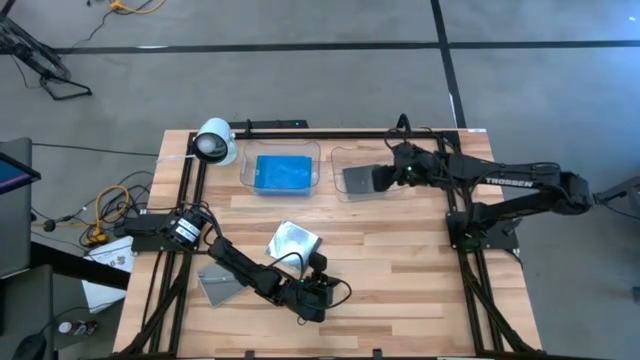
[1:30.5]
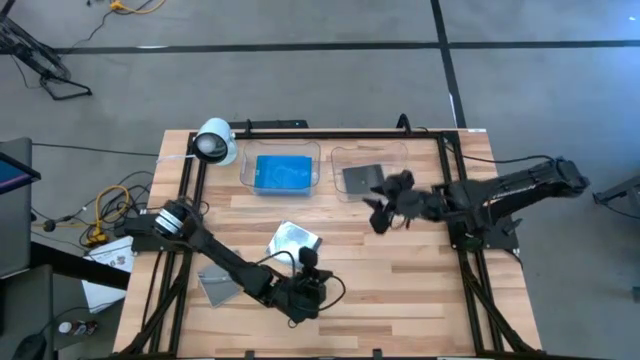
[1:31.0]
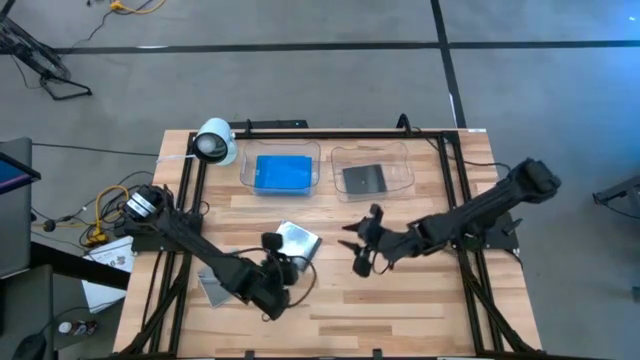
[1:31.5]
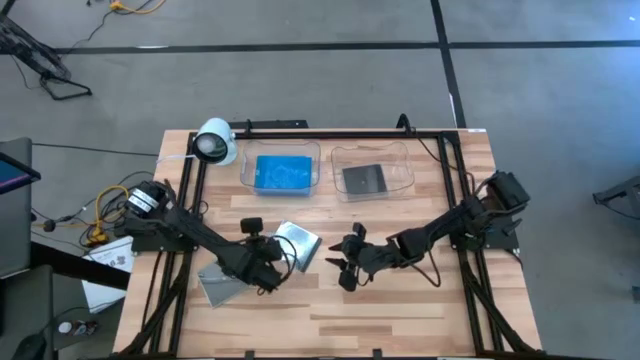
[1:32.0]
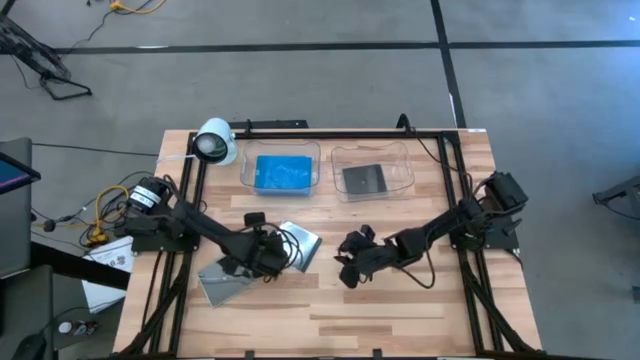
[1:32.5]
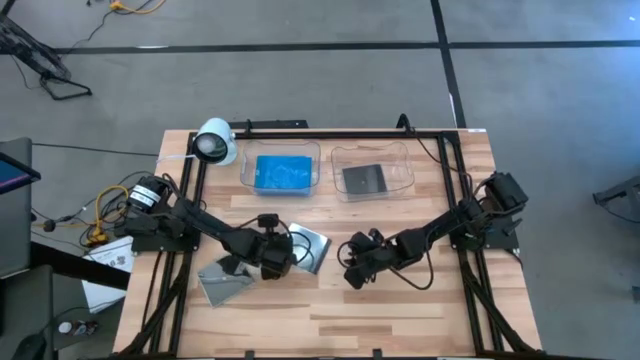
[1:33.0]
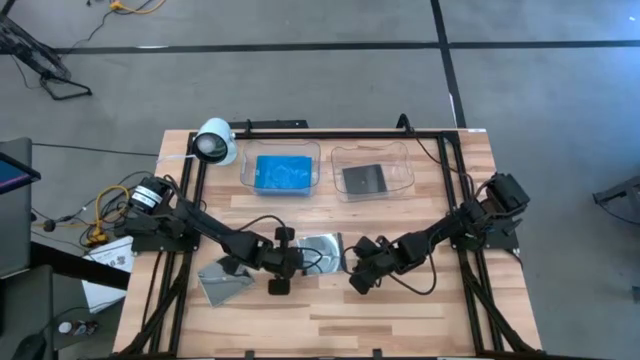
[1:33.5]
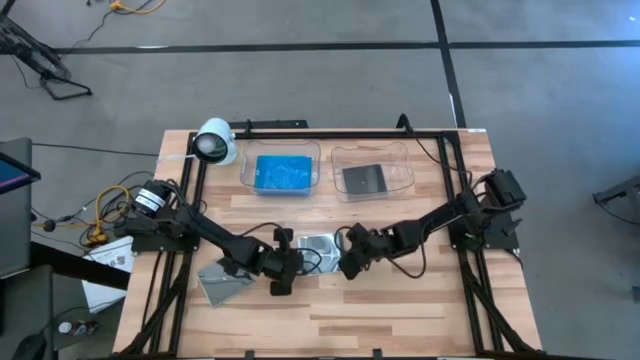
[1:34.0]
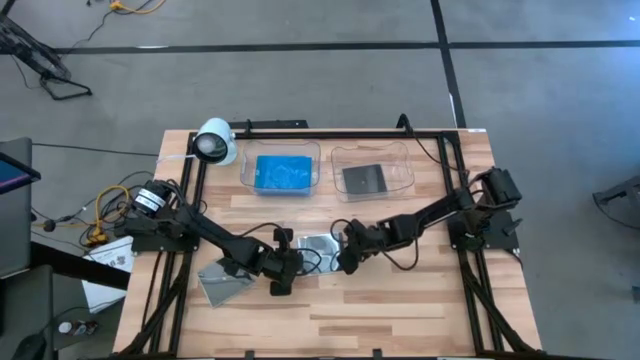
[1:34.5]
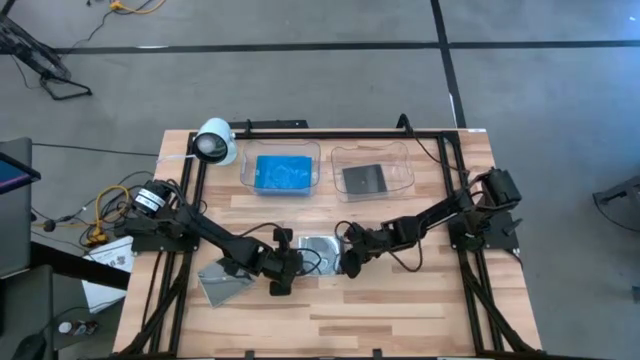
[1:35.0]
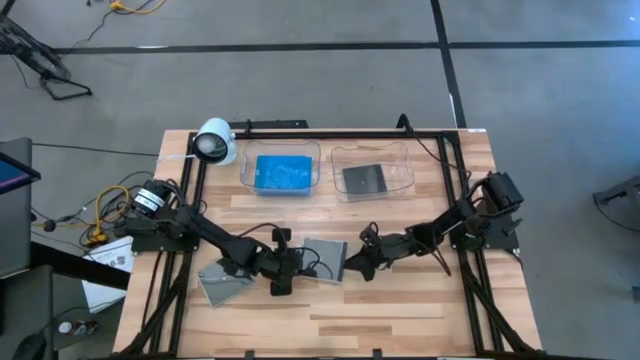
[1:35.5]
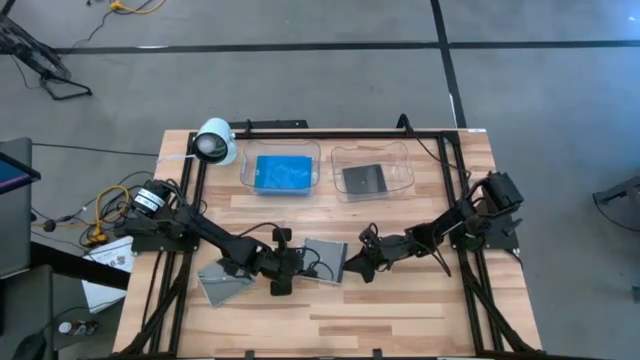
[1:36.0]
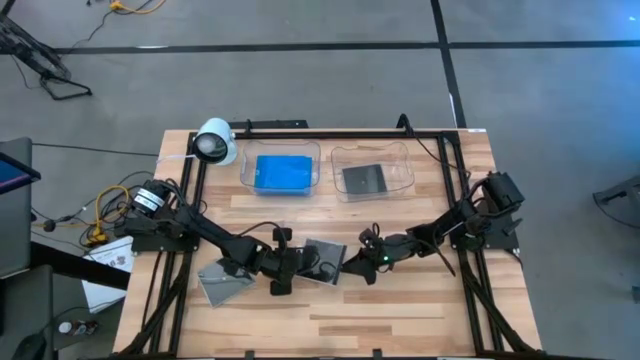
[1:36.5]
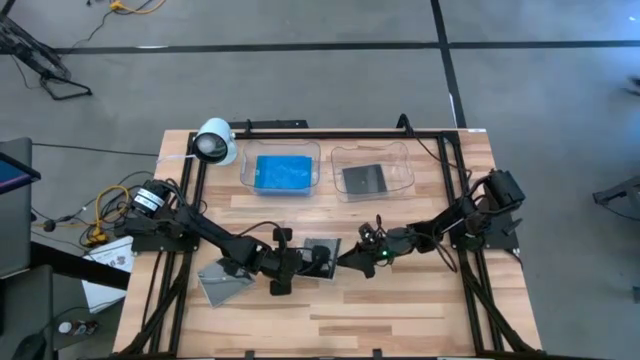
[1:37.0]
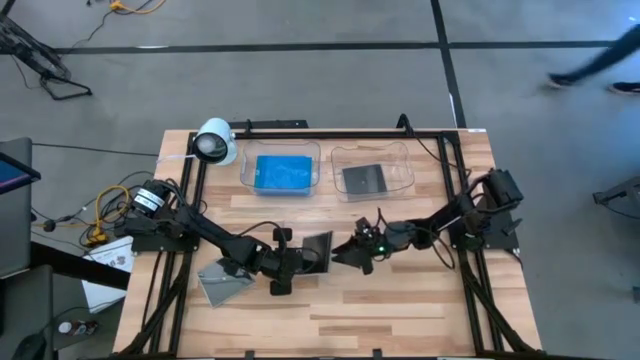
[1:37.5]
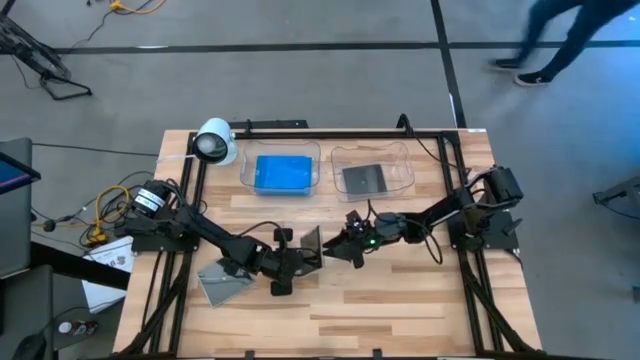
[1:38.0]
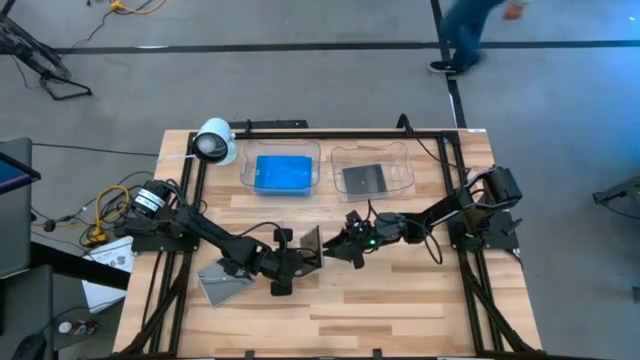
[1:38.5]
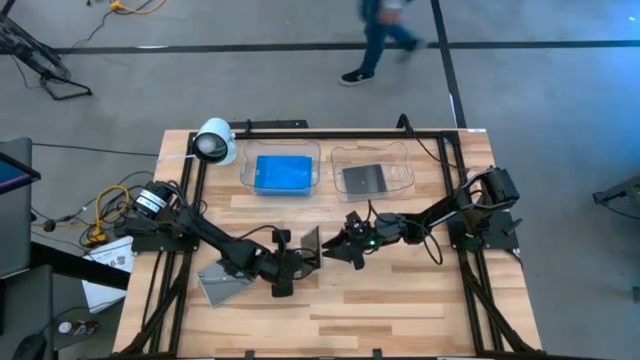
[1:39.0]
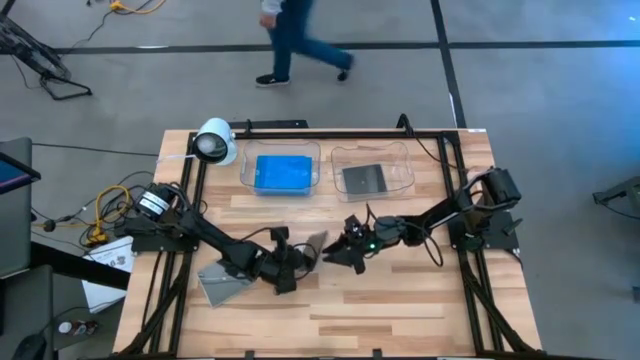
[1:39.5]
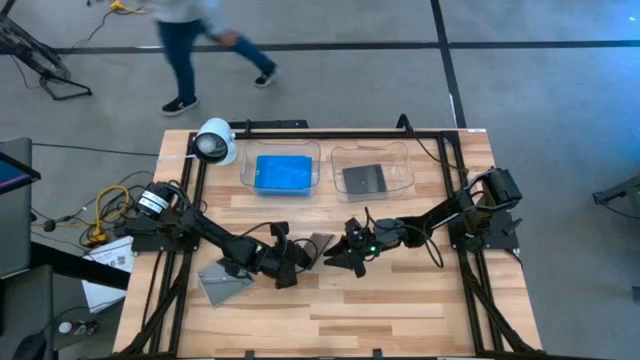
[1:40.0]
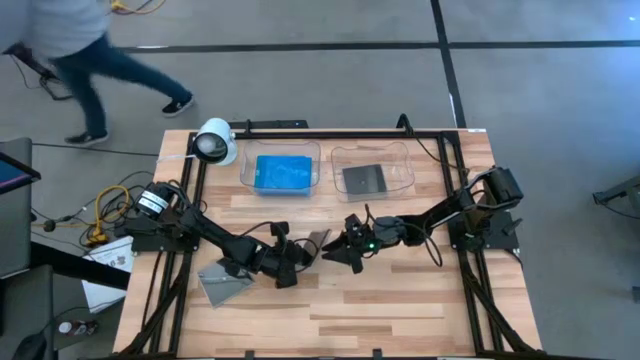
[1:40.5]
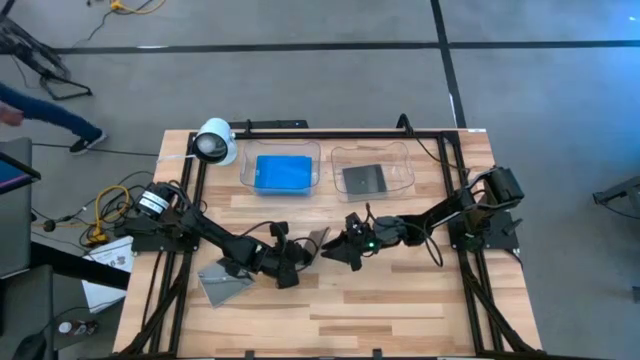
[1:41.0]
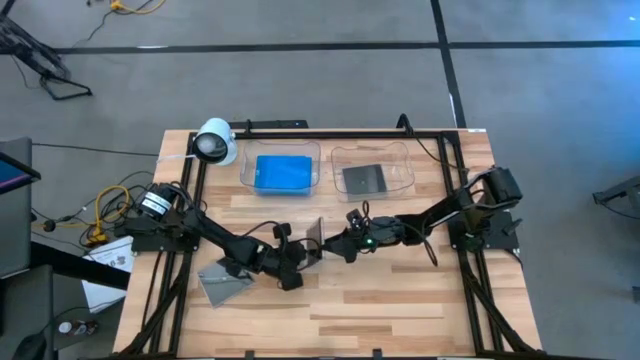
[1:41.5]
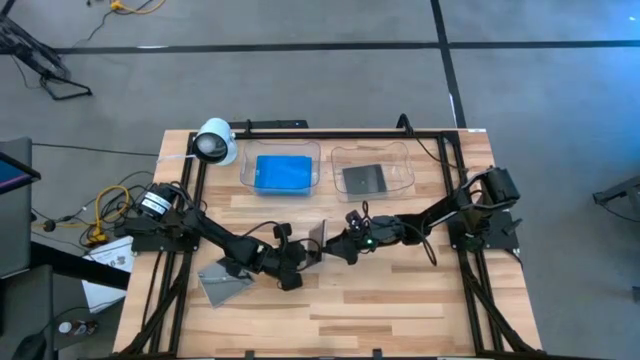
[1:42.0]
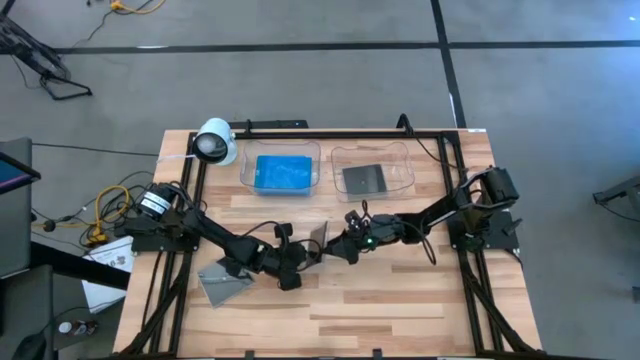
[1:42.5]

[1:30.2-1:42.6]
Task: Pick & place jewel cases by type
Put the right black cd case into the right transparent bin

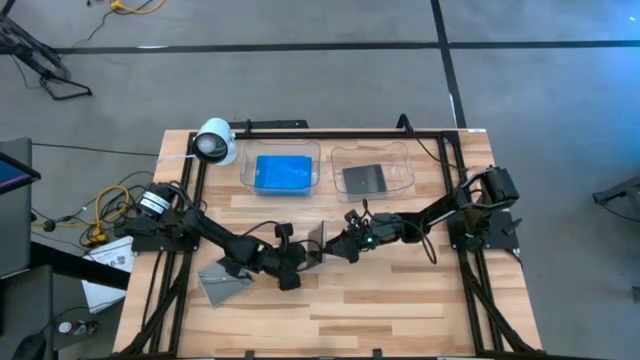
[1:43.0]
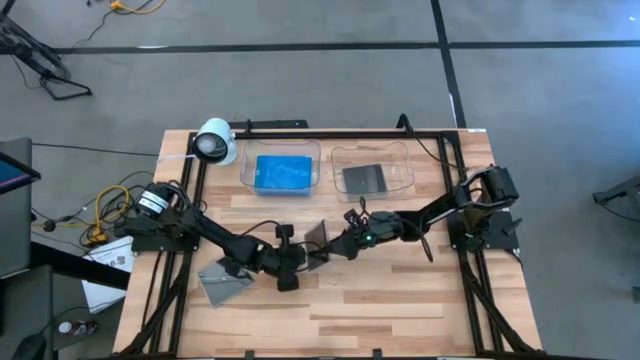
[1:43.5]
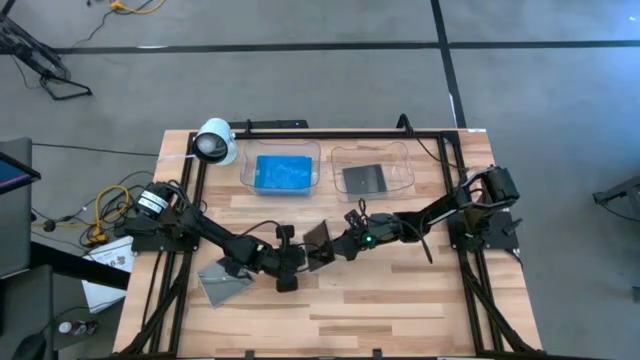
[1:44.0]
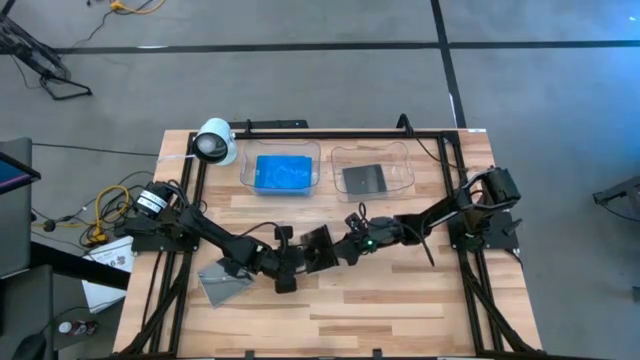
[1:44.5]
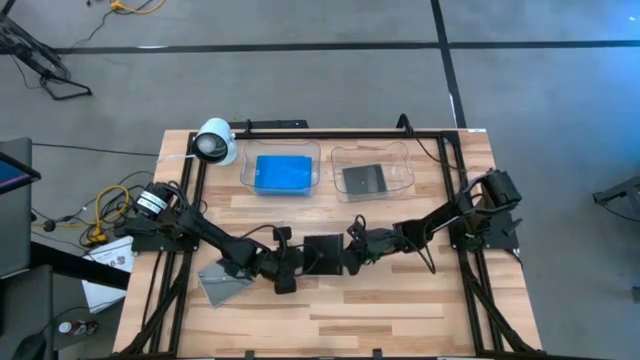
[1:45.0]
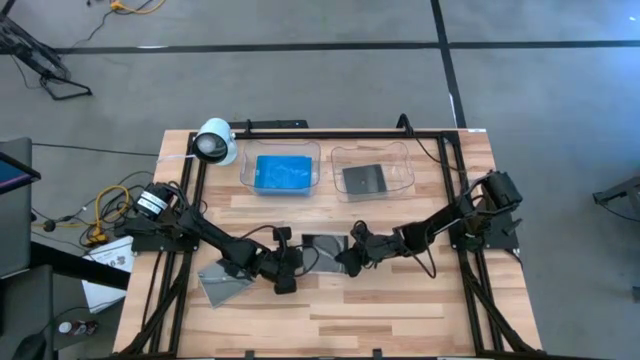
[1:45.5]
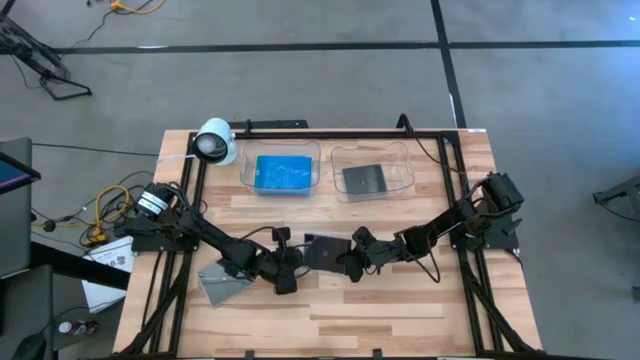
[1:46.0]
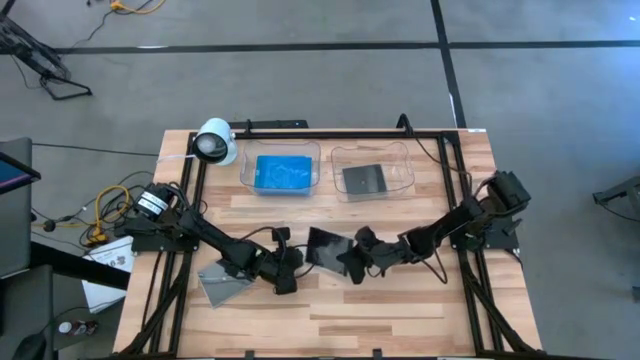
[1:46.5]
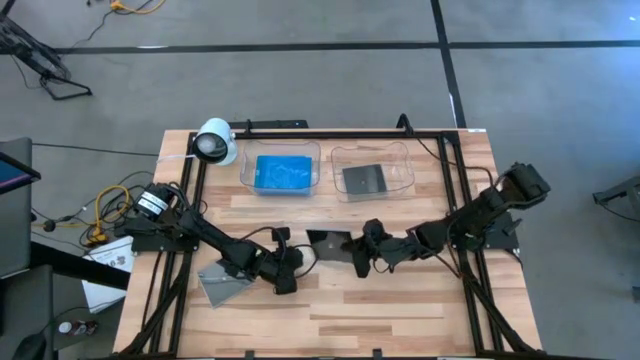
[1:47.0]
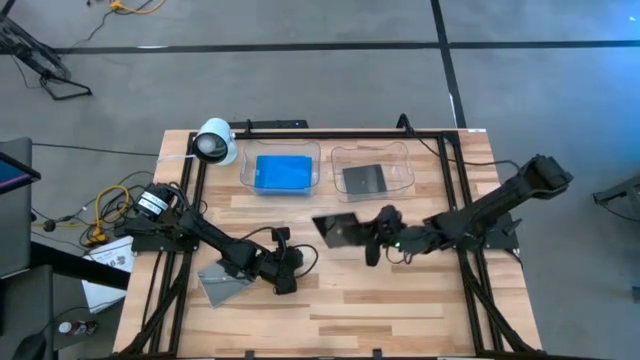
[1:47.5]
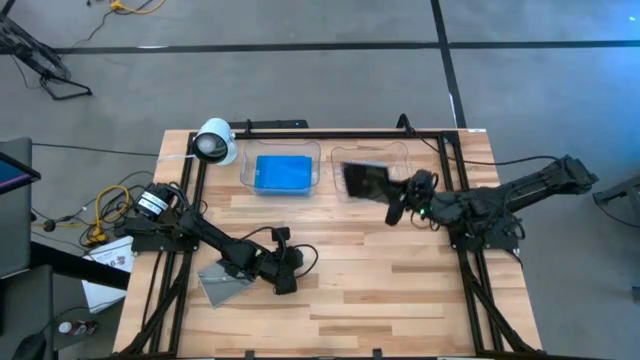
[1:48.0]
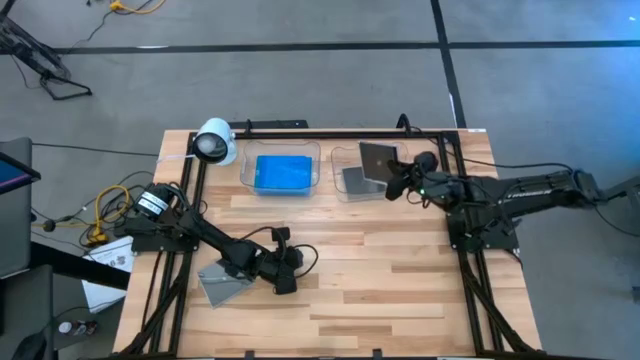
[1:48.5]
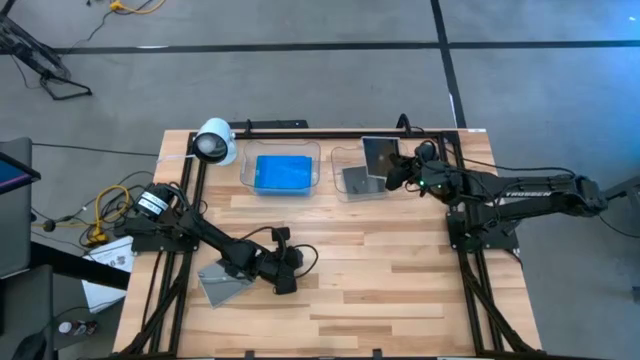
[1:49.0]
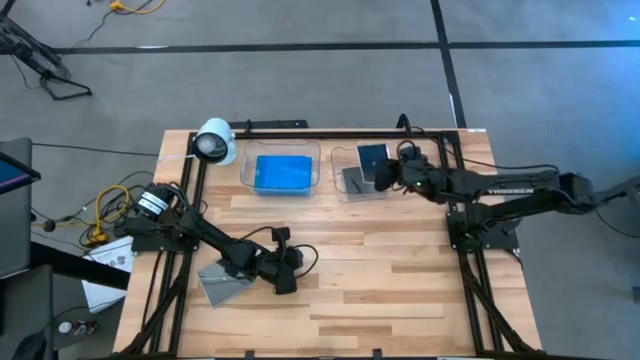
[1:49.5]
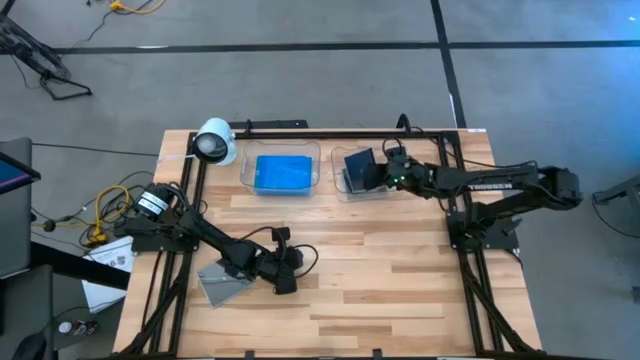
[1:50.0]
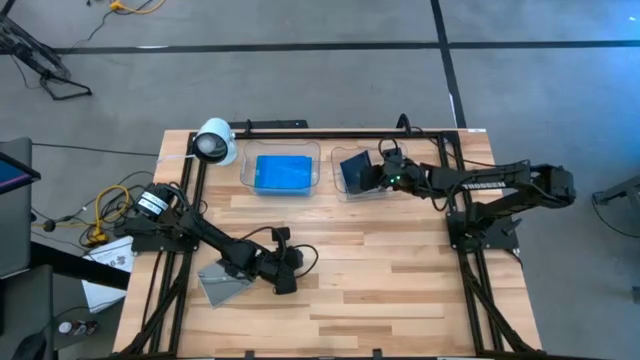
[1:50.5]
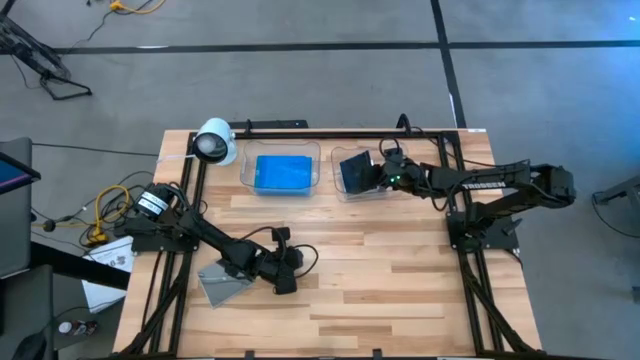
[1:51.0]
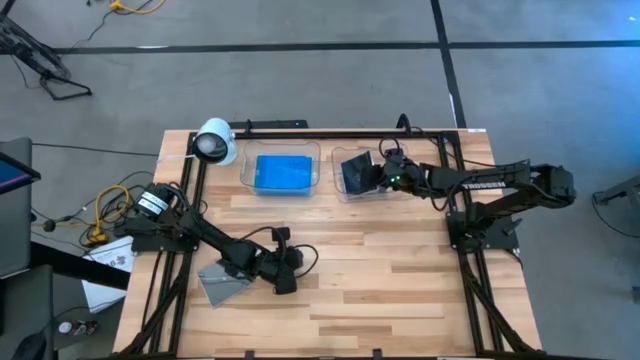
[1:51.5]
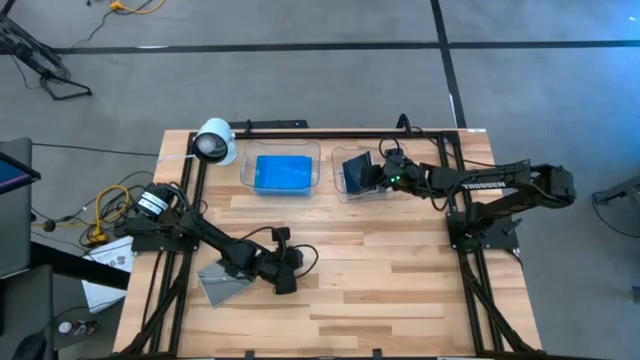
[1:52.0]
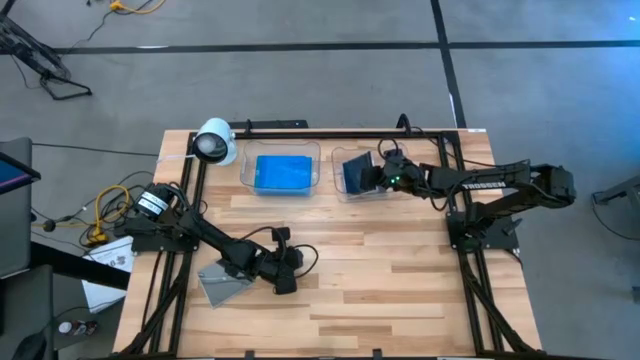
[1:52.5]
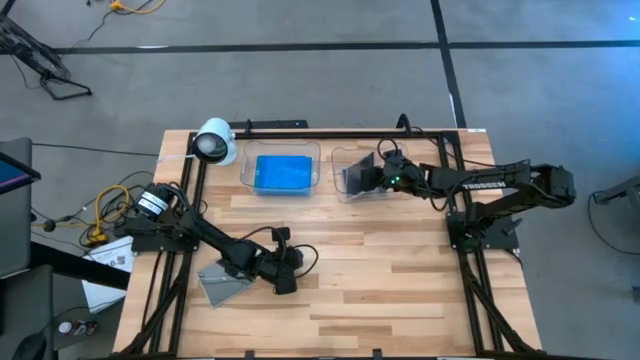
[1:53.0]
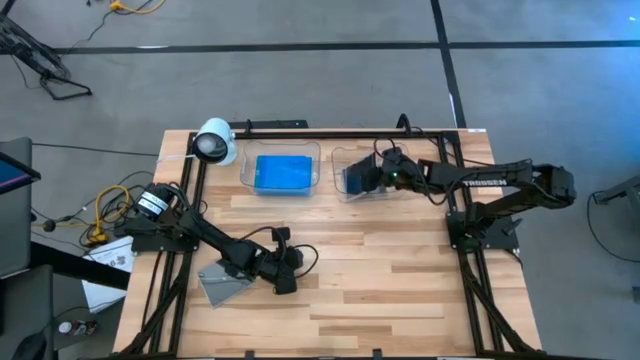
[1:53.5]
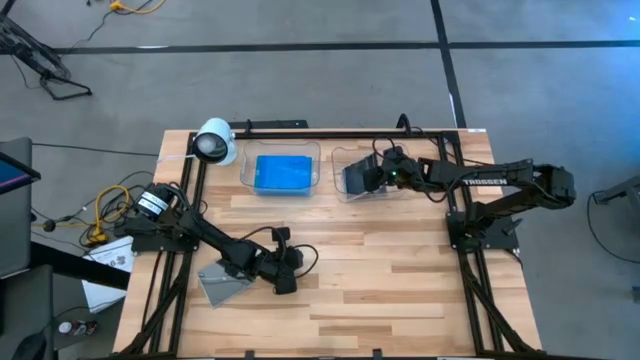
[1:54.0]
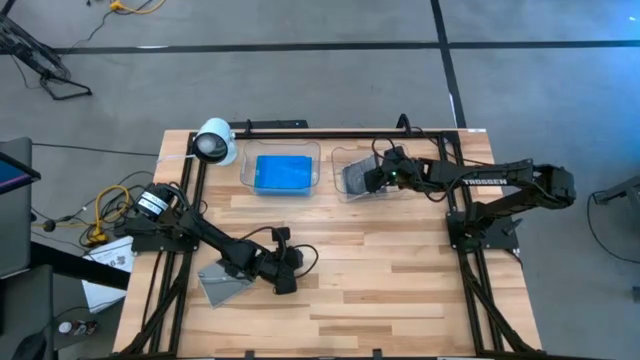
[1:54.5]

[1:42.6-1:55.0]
Put the right black cd case into the right transparent bin
